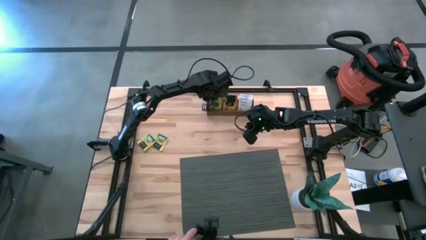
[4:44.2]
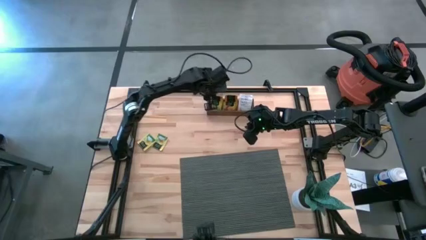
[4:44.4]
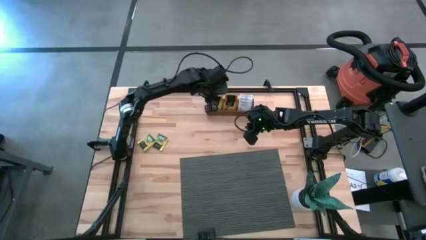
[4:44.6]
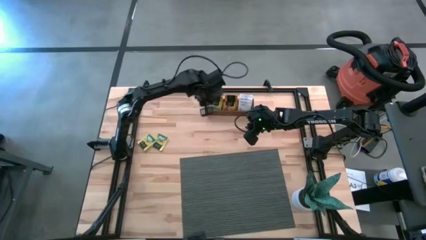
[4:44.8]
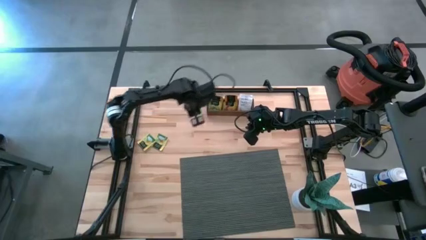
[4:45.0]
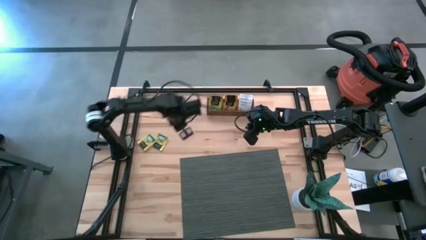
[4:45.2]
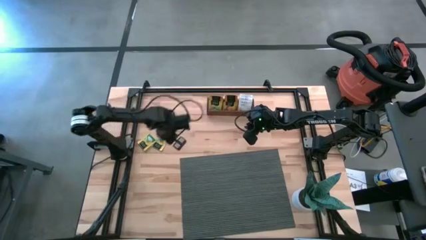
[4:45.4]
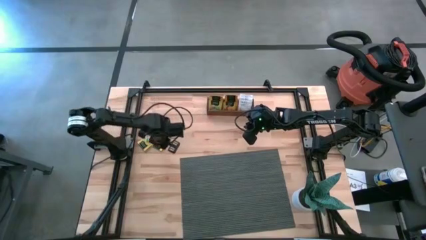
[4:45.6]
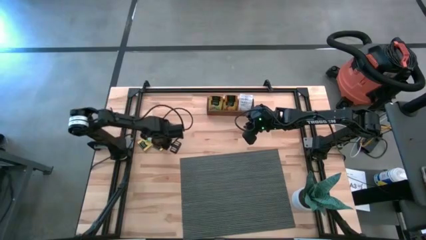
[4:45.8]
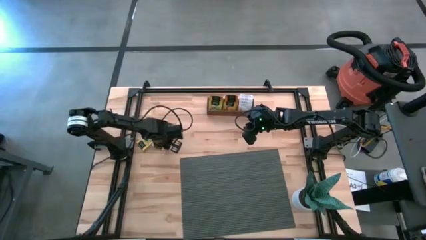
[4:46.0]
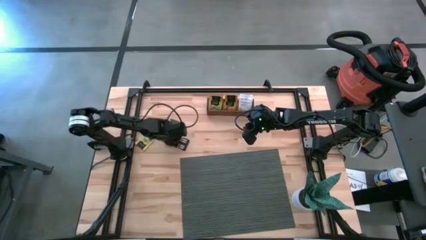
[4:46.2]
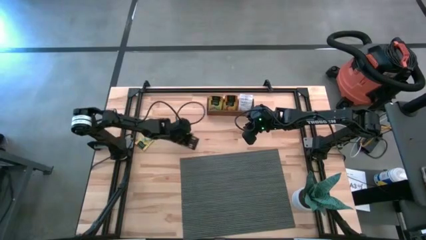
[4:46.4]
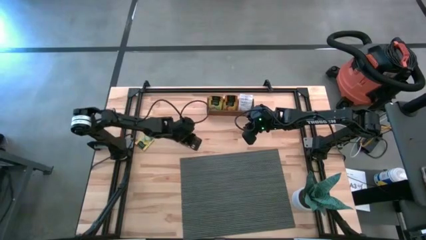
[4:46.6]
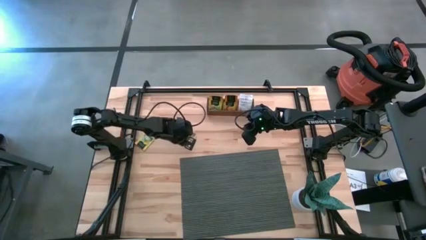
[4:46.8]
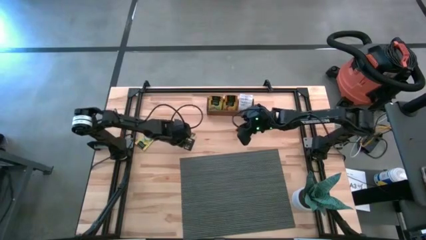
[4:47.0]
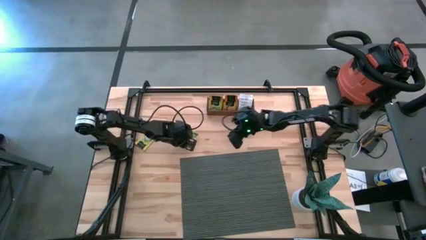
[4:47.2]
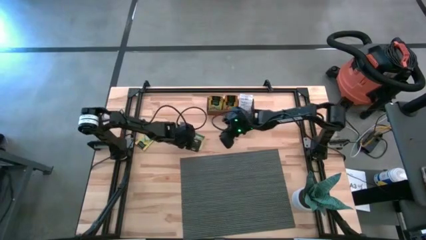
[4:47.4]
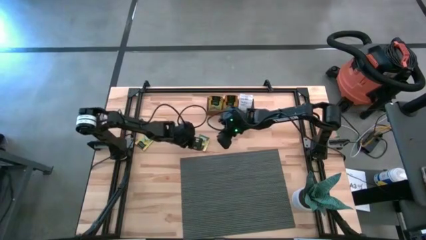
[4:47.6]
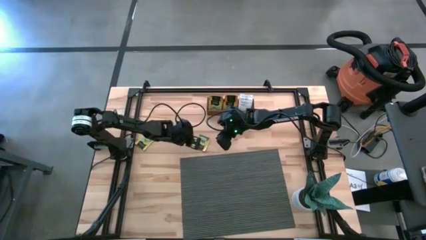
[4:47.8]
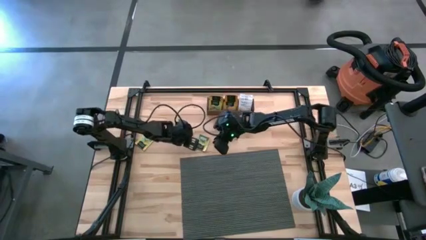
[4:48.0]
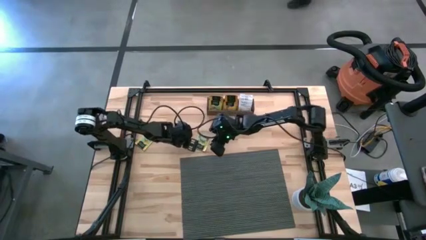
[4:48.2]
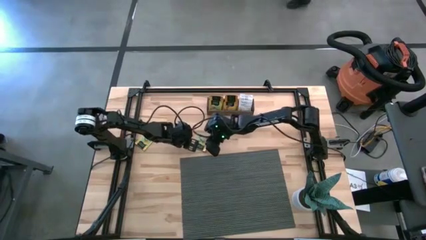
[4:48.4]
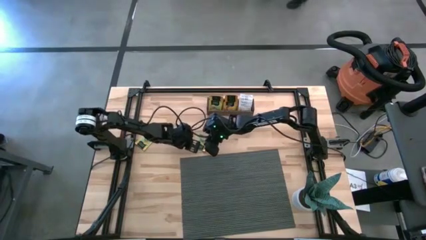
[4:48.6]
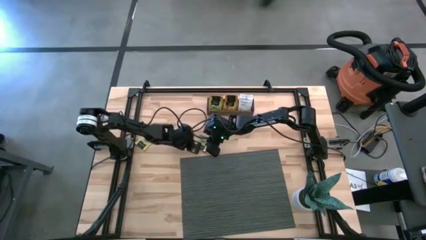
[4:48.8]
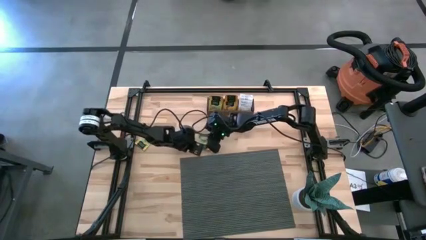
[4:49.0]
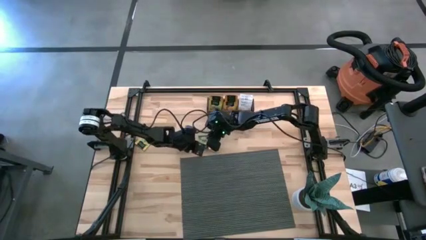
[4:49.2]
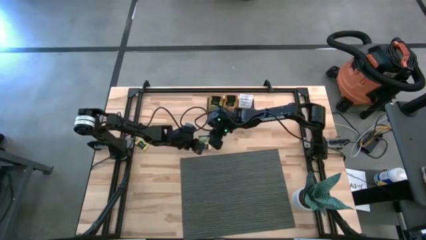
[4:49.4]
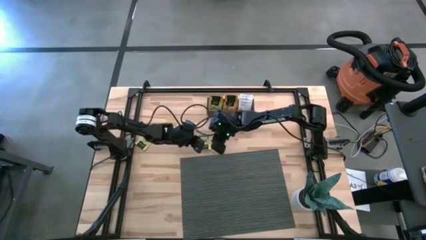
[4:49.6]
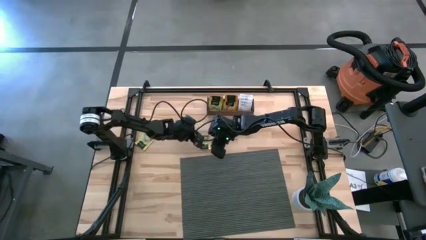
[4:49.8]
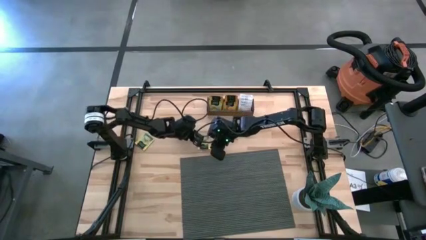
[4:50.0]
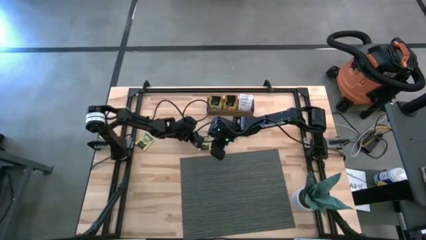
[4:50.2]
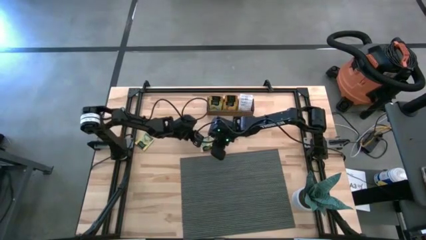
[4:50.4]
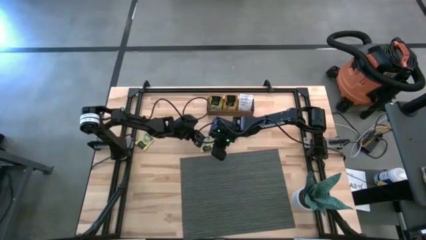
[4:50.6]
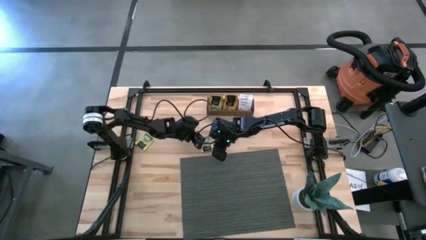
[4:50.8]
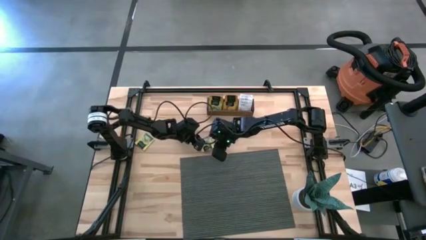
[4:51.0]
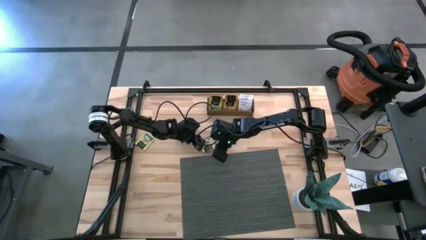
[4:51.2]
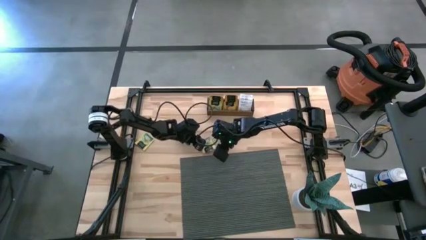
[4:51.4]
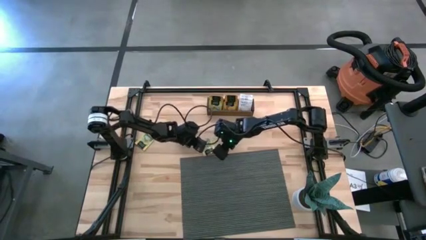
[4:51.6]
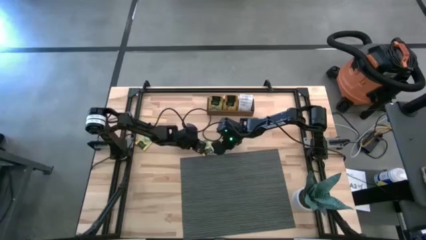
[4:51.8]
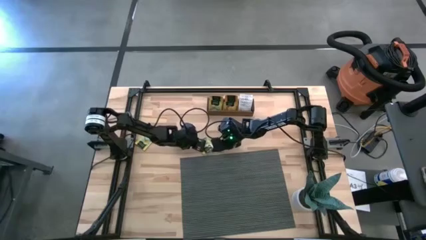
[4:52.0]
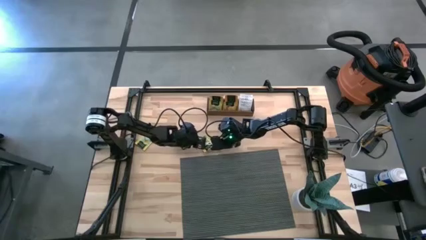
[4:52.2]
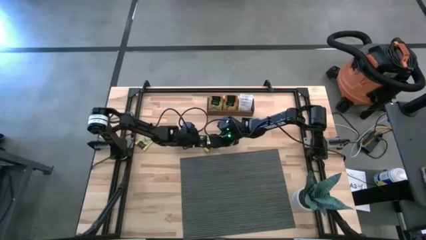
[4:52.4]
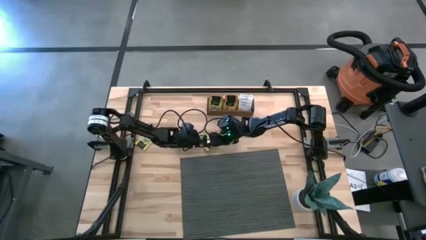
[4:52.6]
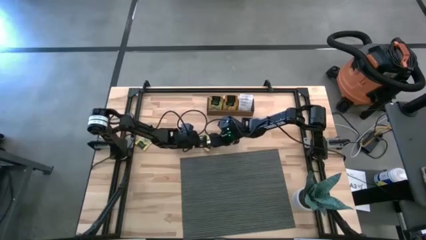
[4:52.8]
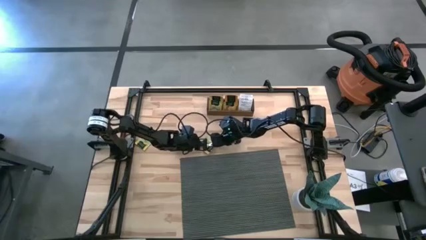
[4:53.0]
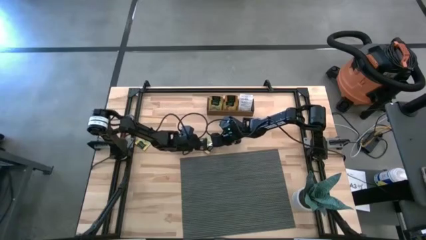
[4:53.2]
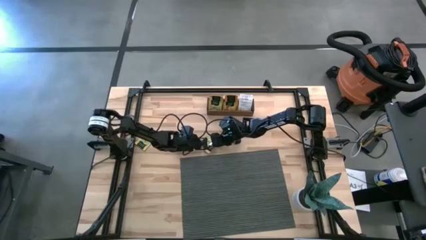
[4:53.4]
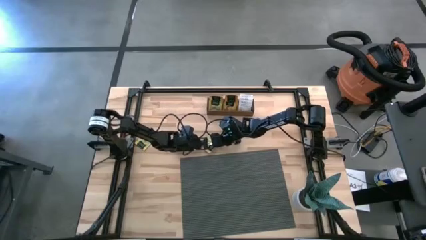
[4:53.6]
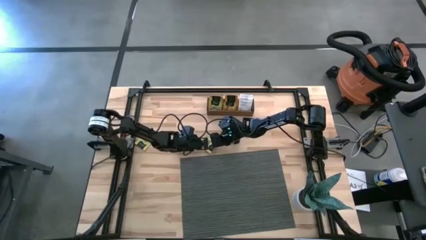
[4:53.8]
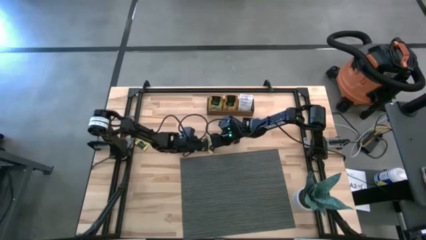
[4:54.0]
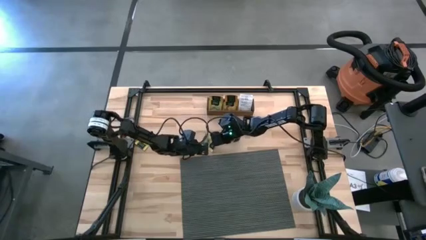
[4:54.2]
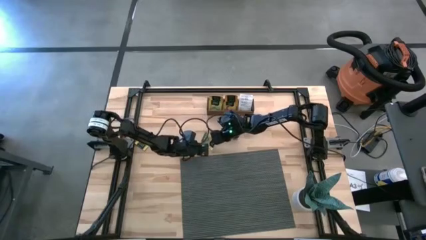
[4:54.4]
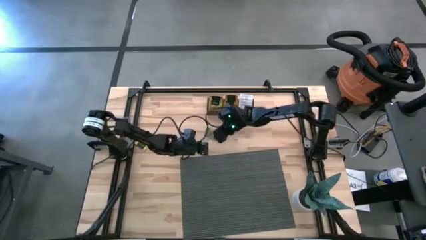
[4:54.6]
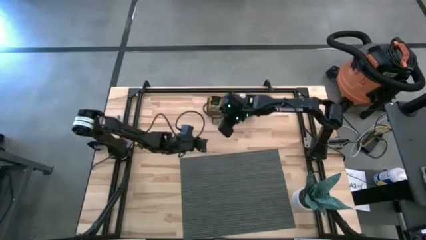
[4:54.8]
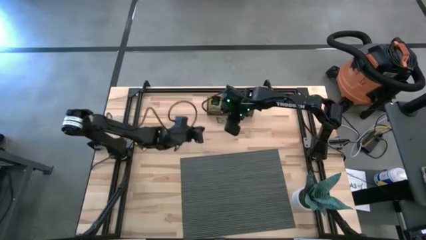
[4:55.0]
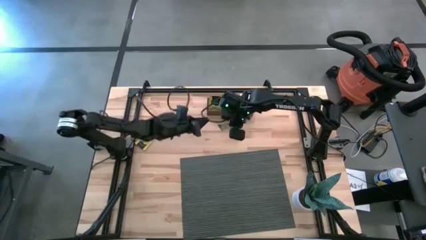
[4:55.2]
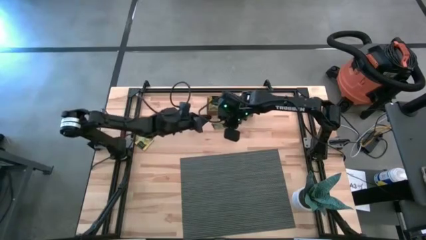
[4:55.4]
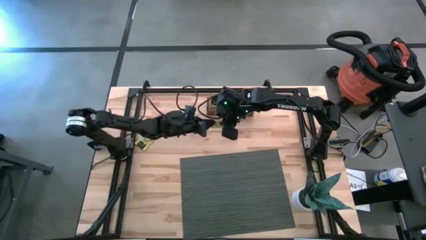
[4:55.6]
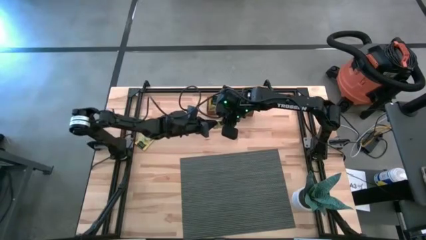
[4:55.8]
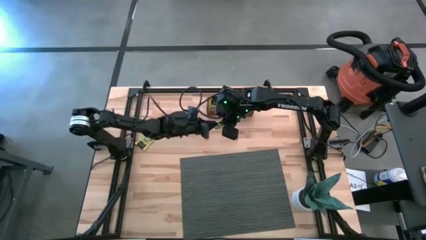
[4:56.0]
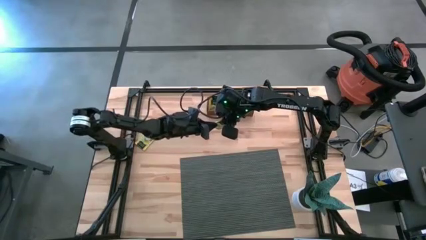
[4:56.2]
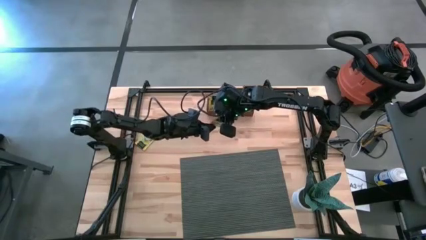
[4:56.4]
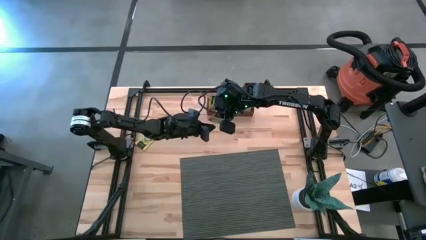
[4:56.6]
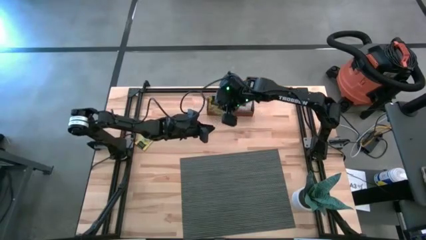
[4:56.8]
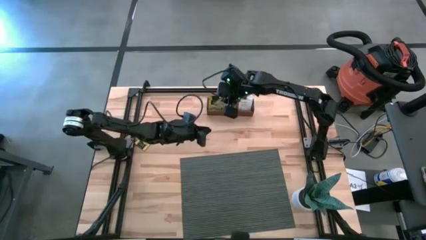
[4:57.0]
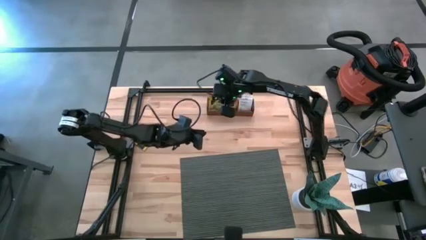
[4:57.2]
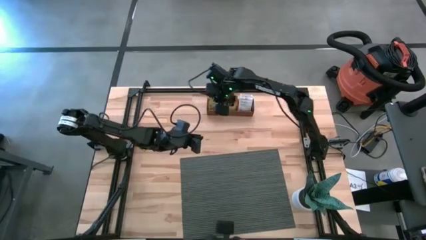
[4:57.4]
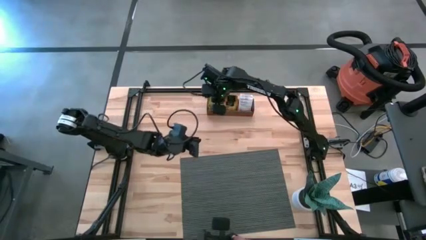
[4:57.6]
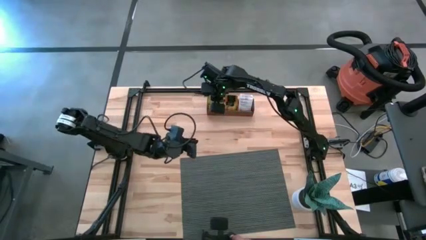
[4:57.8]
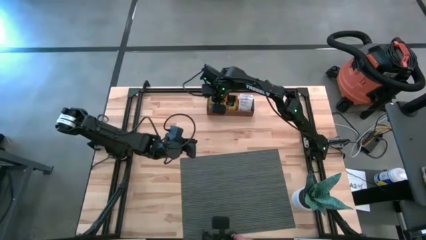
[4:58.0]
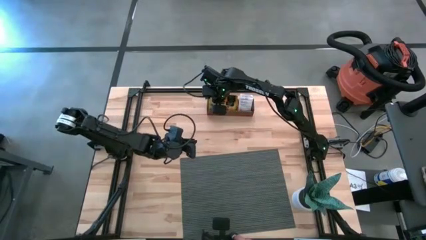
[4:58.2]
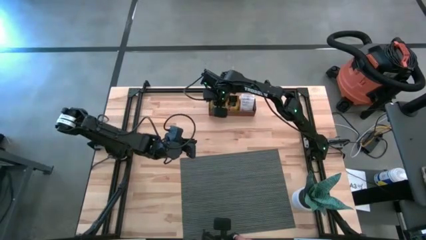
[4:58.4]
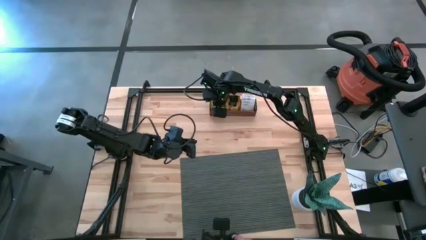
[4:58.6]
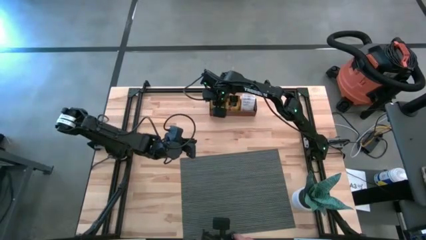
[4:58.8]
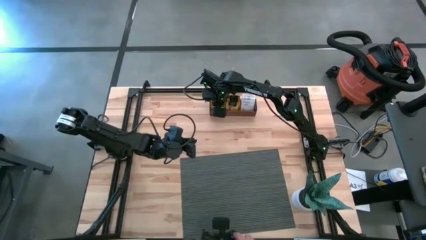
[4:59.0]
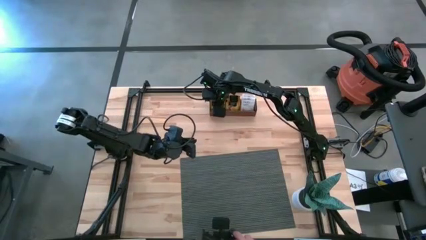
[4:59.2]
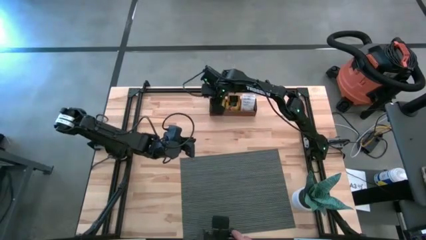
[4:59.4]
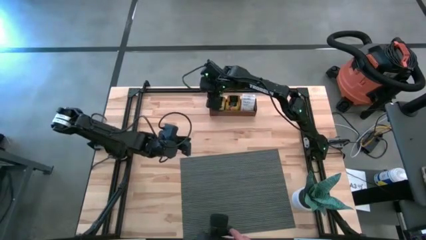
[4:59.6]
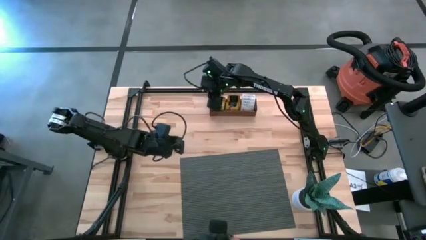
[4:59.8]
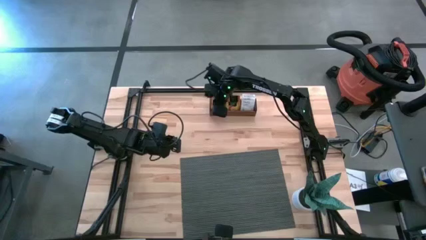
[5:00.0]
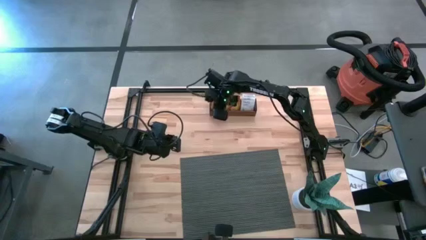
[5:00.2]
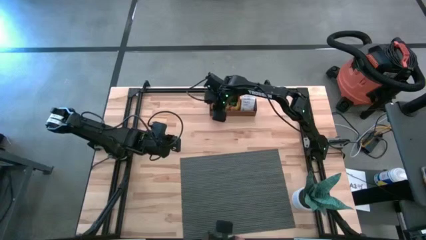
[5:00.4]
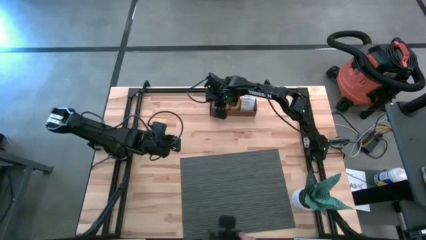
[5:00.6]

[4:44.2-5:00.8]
Task: Pick & Place Tea
Put the yellow tea bag into the left section of the wooden organizer

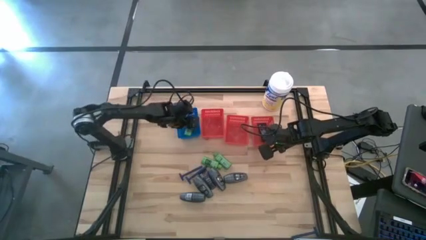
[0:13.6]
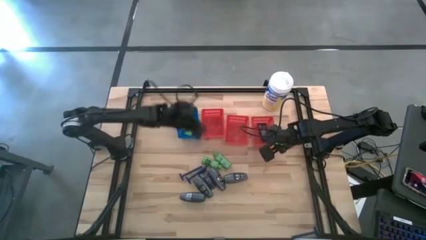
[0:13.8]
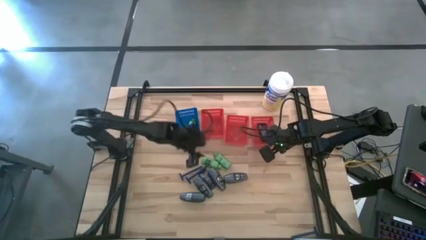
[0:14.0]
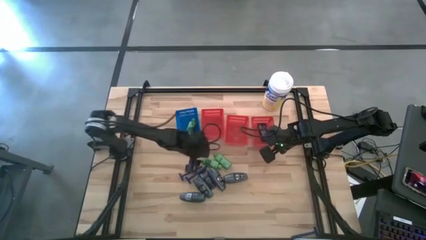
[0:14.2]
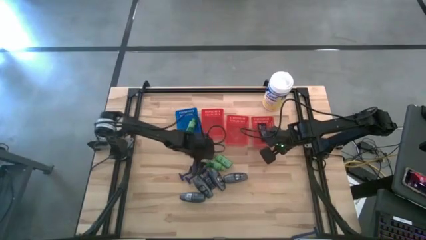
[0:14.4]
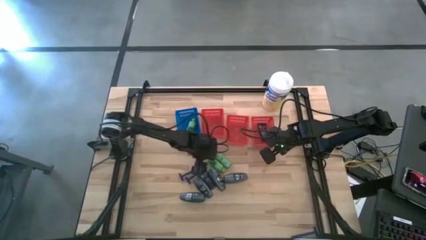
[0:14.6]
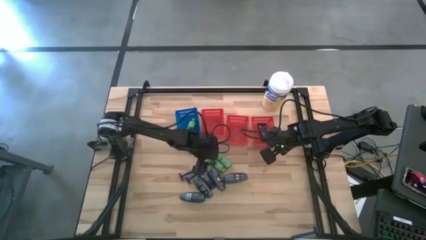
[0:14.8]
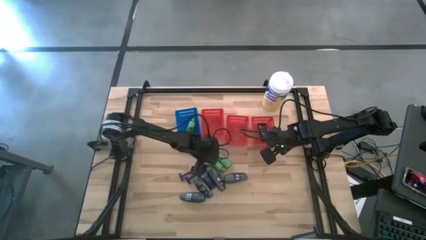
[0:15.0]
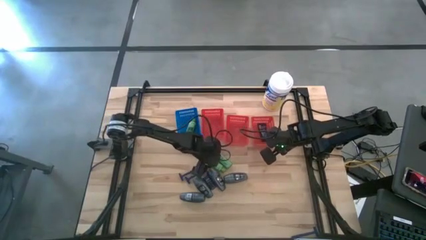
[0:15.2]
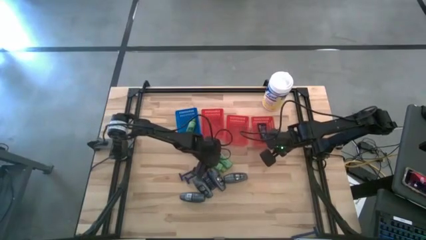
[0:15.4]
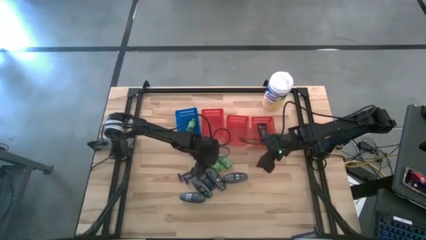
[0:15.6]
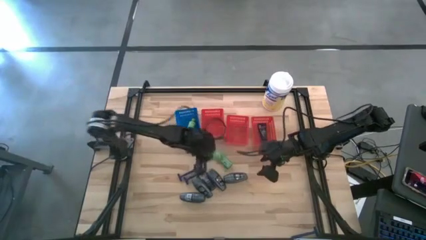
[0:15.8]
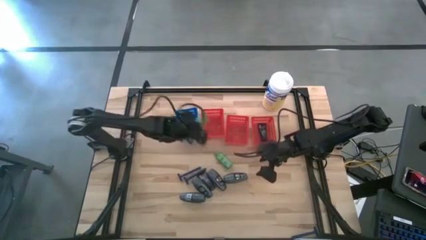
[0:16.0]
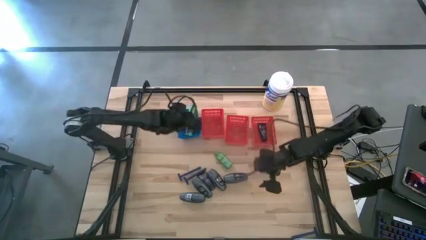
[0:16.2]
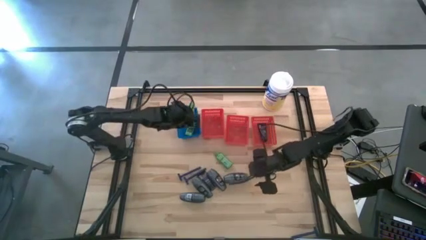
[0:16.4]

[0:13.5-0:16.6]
Task: Pick & Place Travel size toiletries
Put the green shampoo into the blue bin
